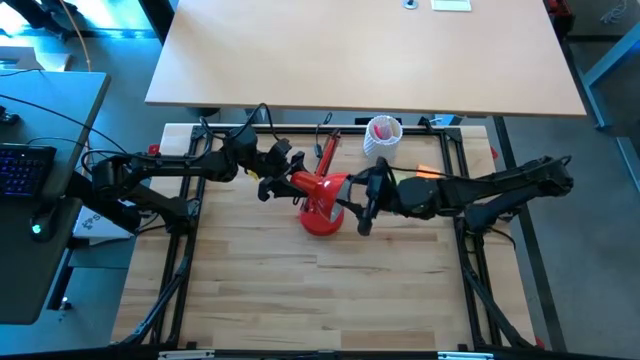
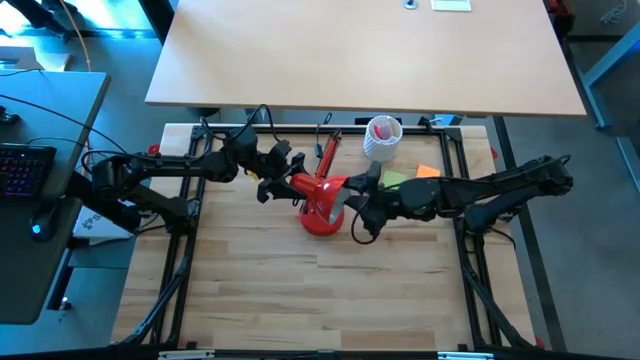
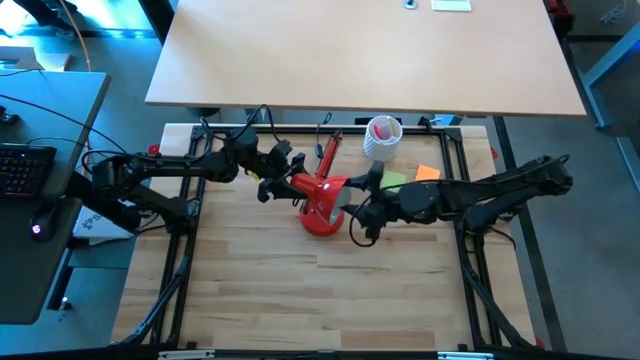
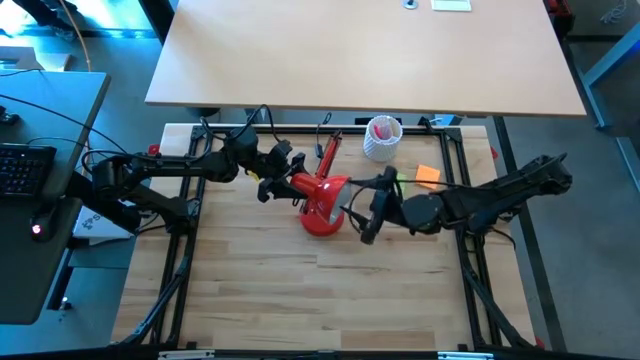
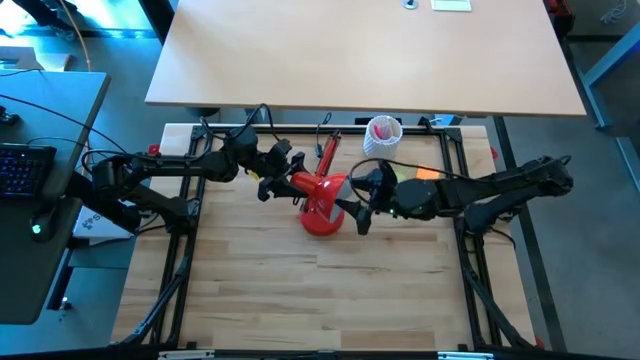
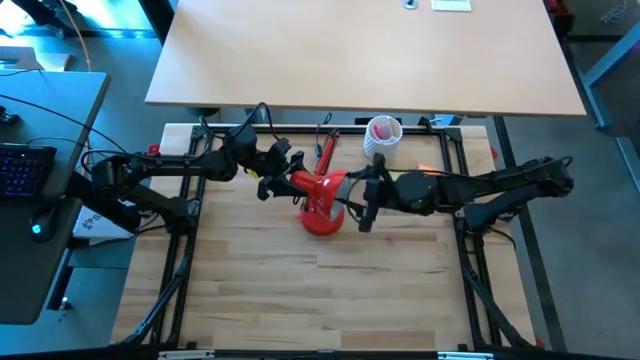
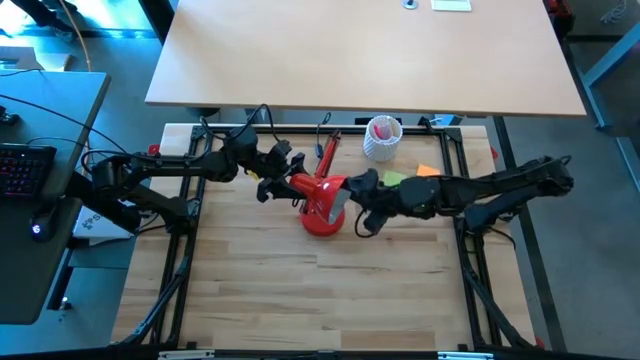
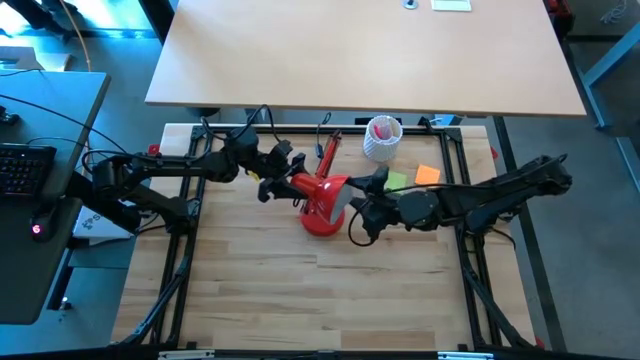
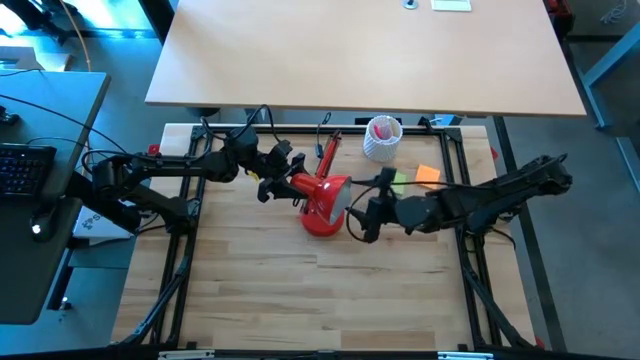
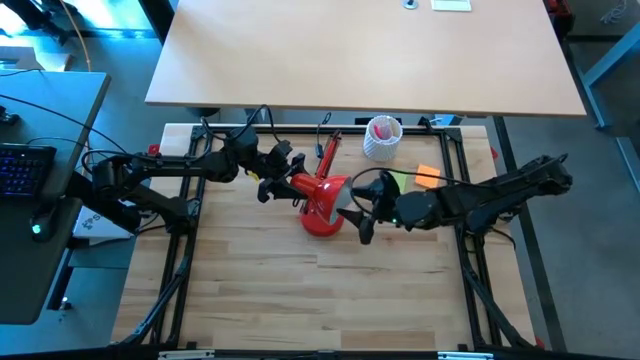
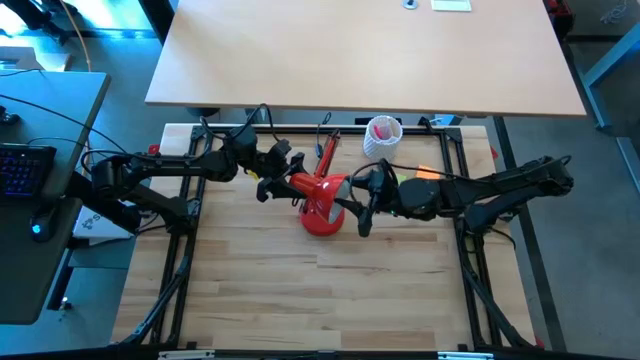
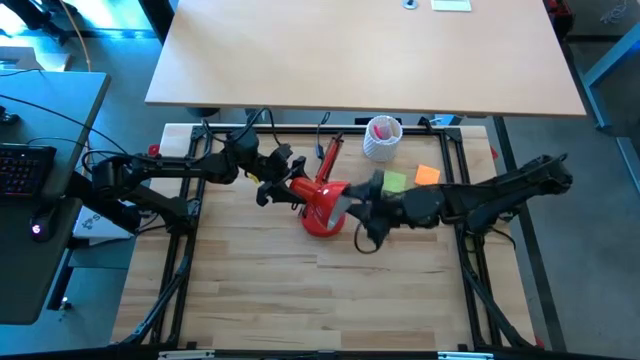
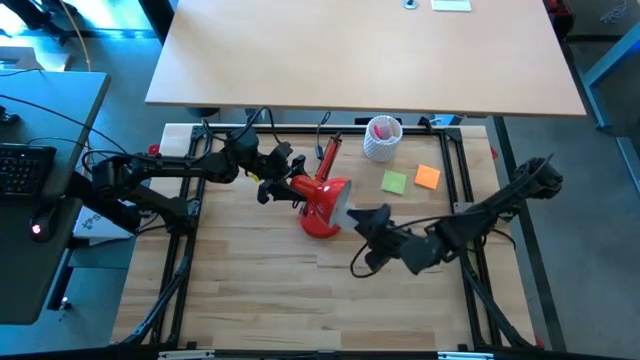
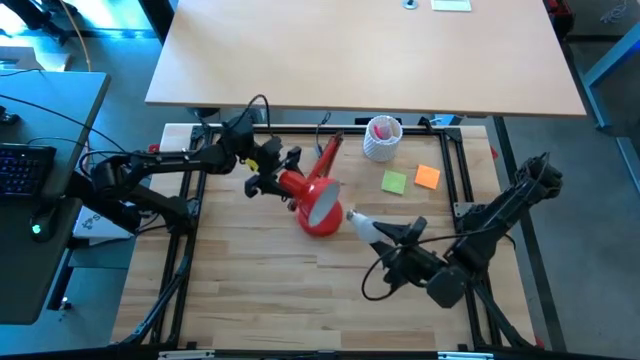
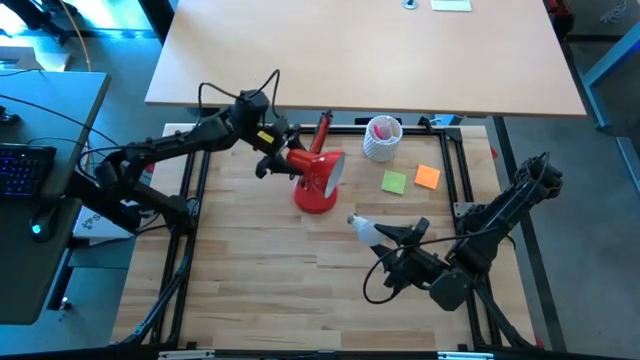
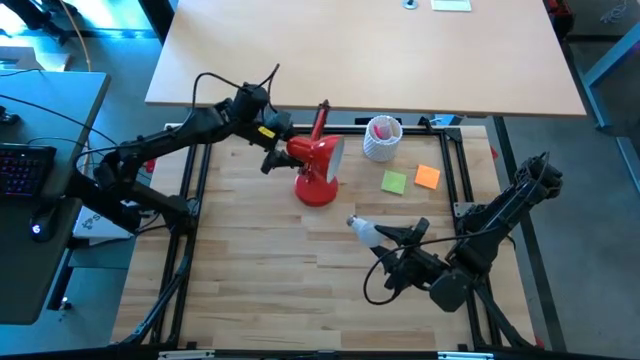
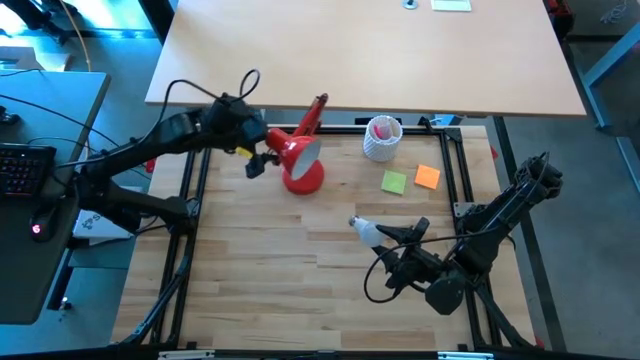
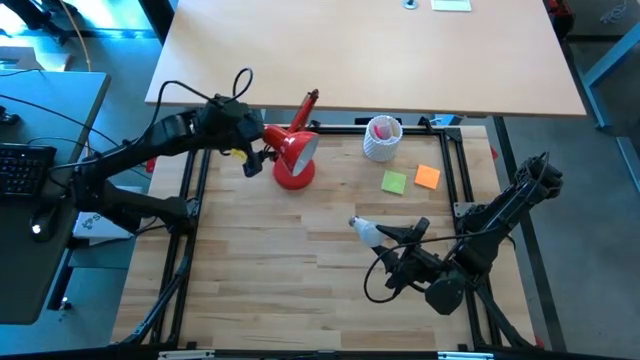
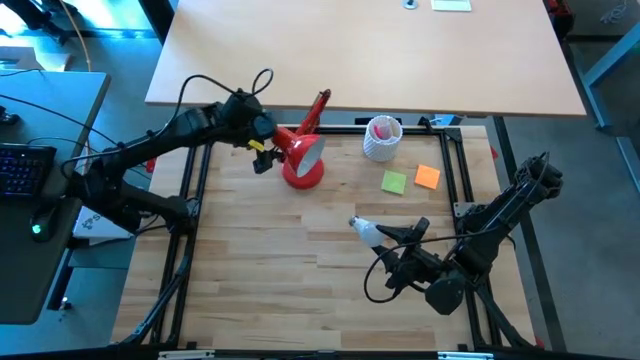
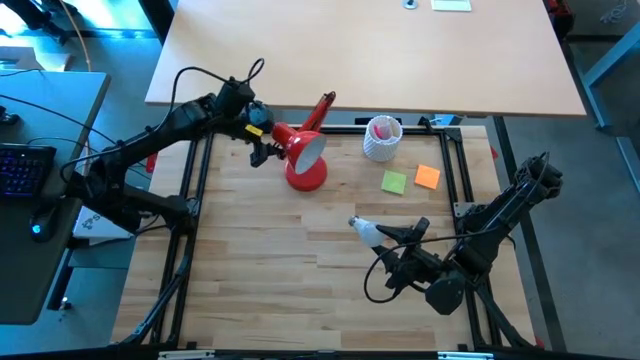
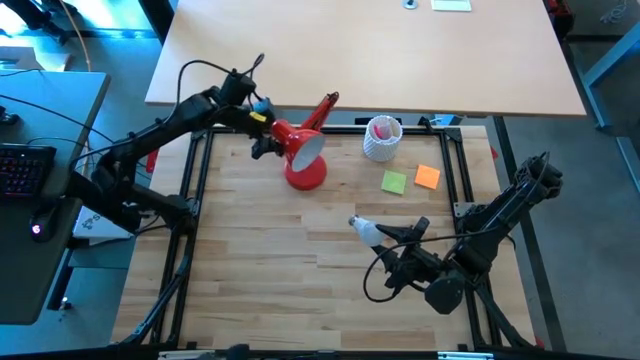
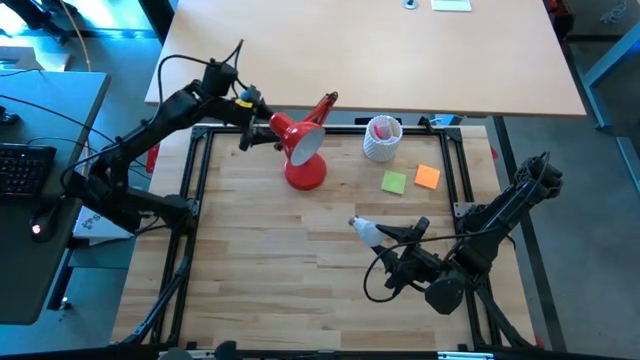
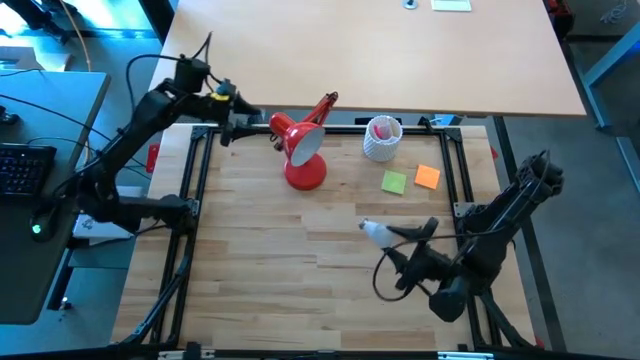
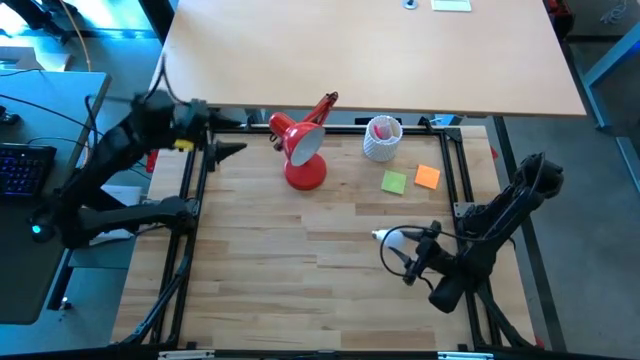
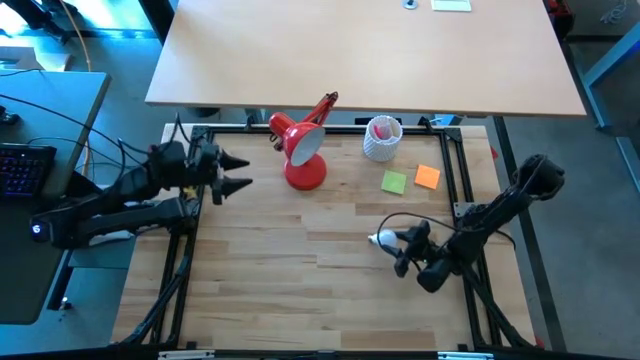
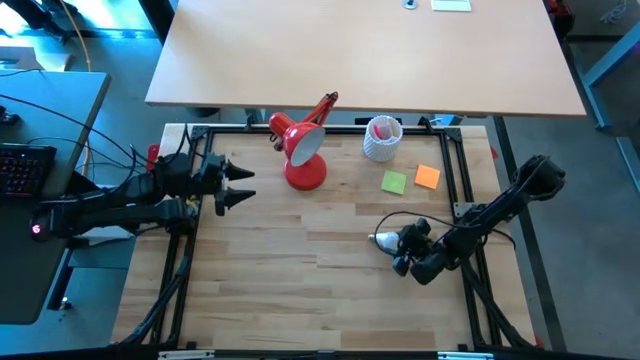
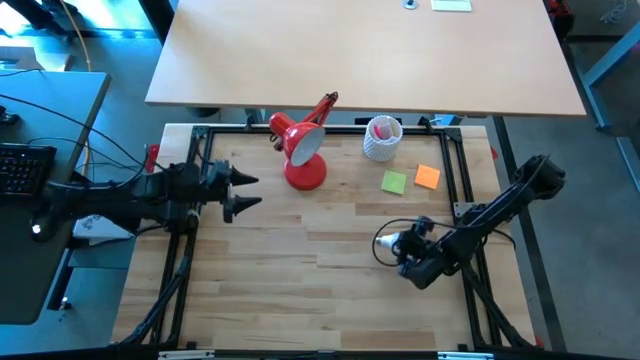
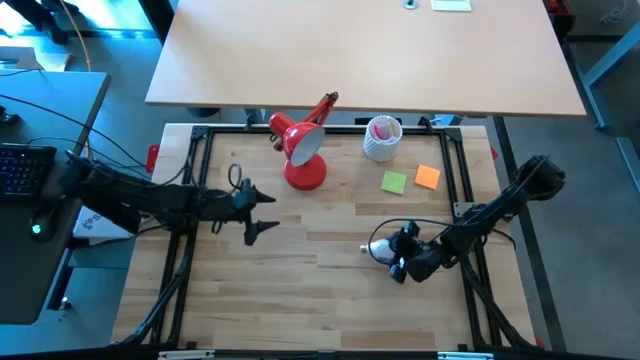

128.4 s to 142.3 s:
Task: Screw lightbulb
Remove the white lightbulb from the red lamp

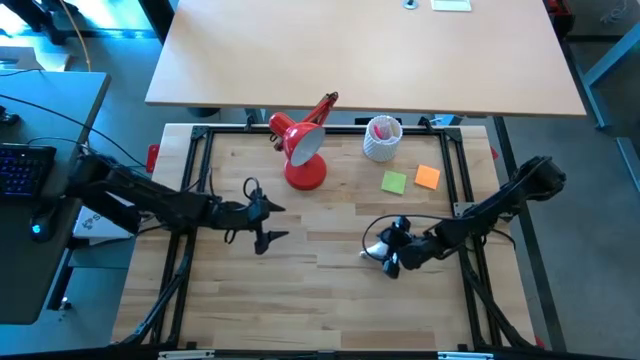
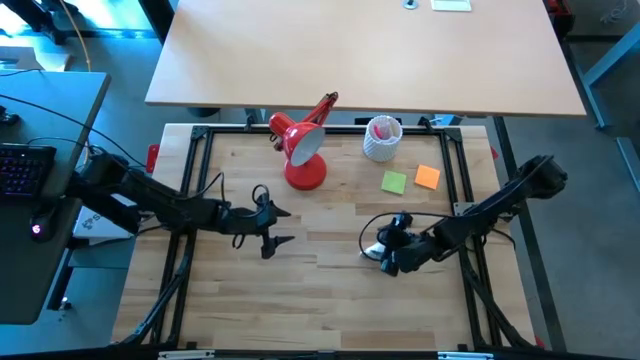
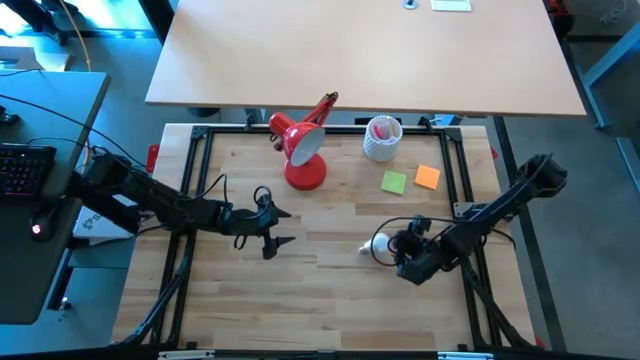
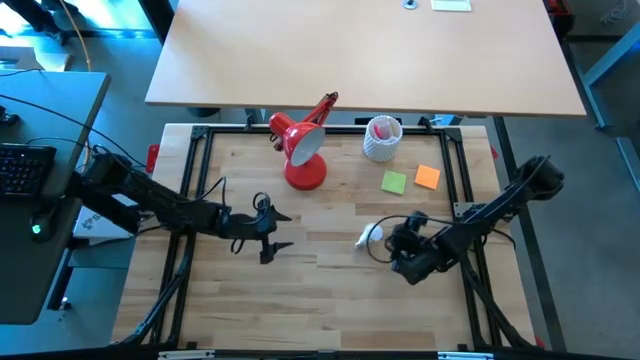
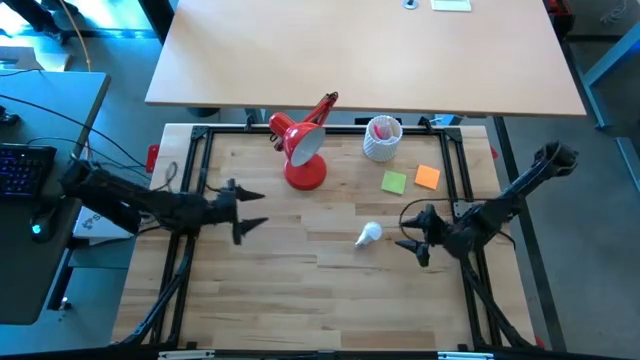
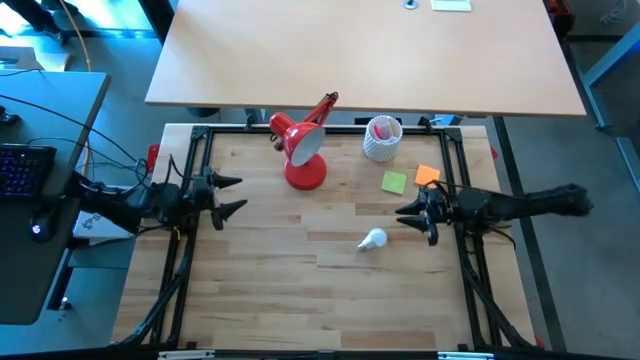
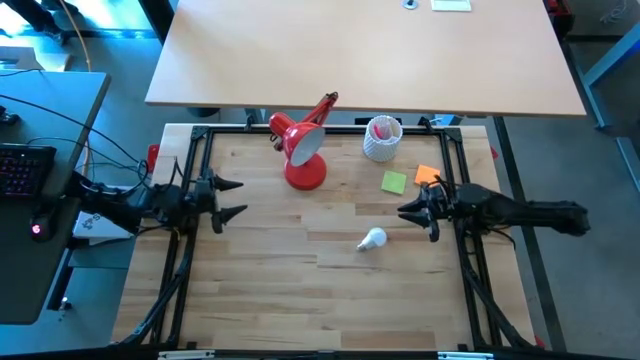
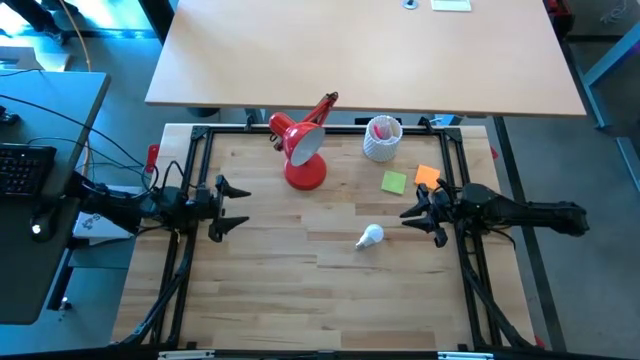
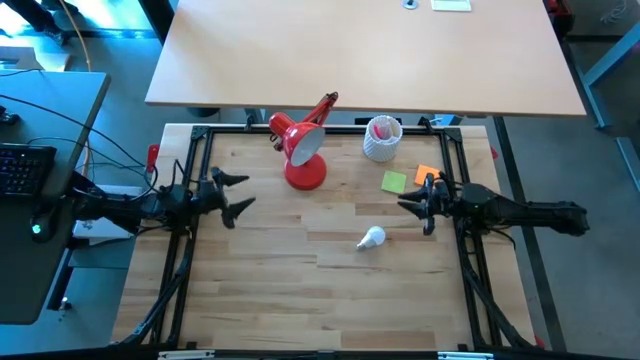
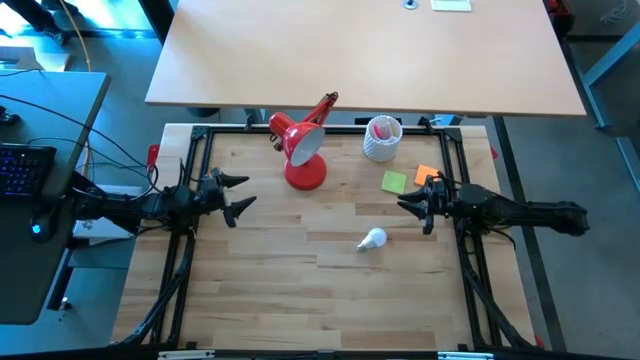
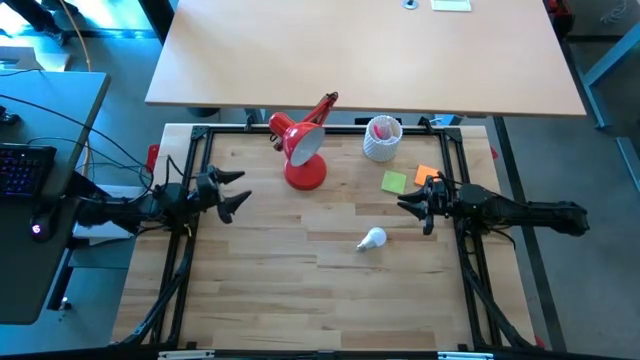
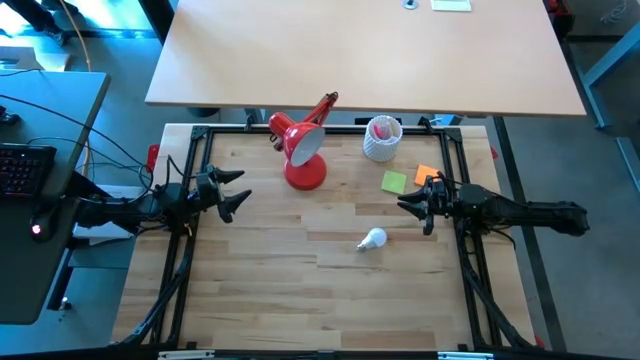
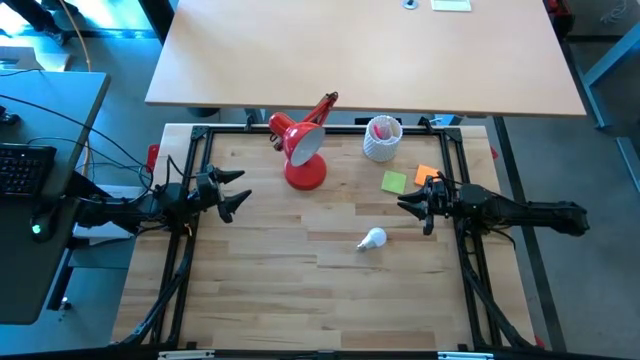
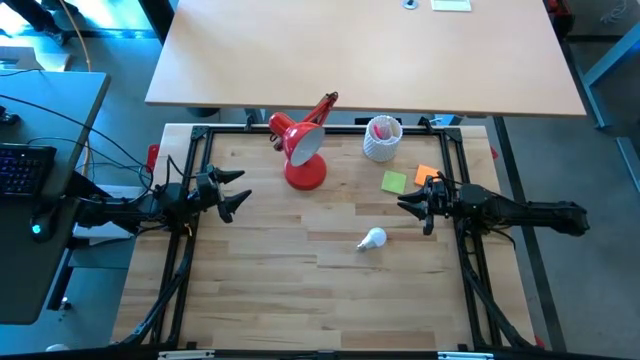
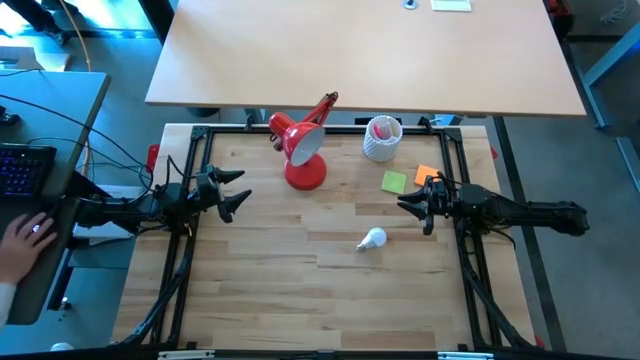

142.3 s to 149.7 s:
Return to Home Position
